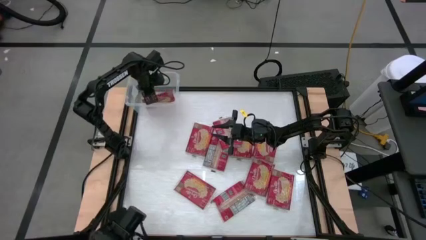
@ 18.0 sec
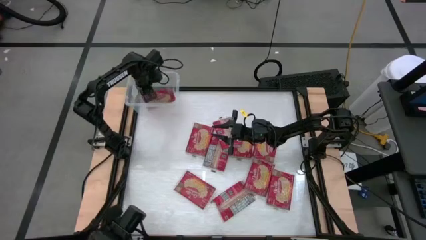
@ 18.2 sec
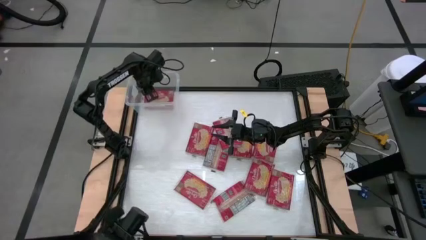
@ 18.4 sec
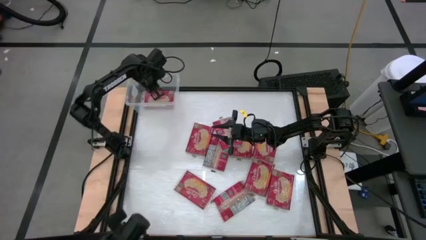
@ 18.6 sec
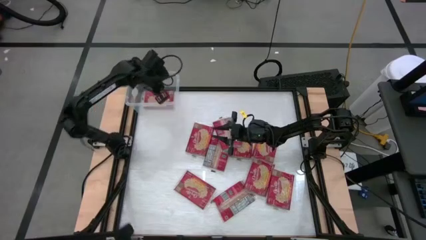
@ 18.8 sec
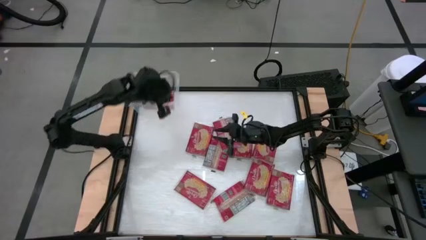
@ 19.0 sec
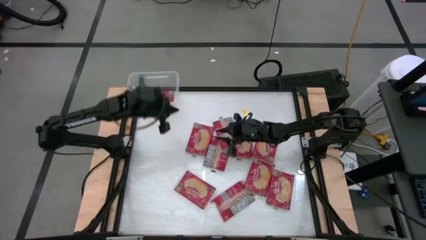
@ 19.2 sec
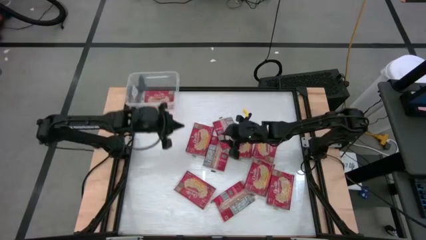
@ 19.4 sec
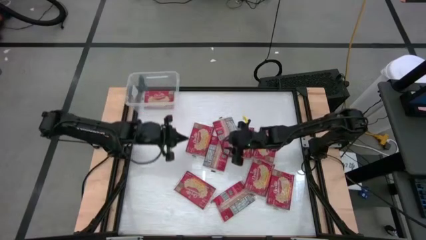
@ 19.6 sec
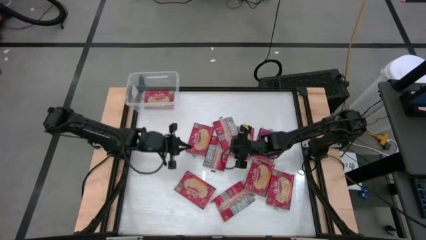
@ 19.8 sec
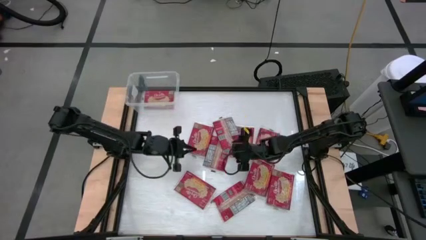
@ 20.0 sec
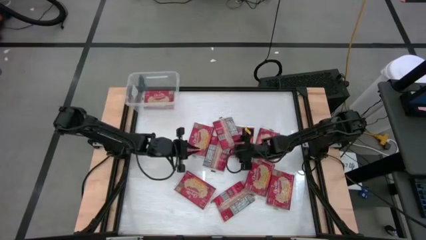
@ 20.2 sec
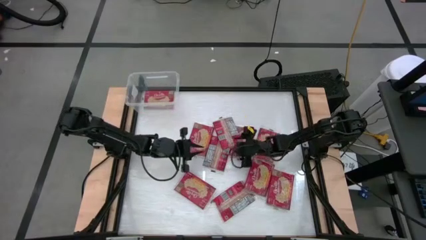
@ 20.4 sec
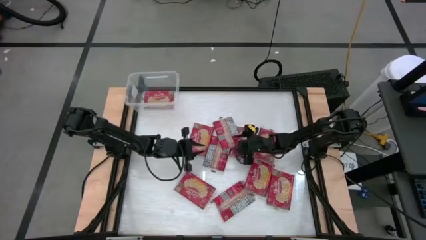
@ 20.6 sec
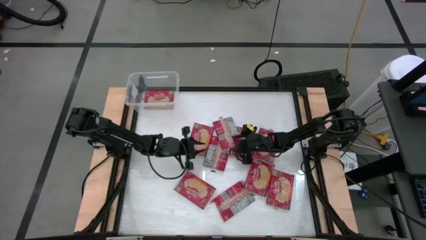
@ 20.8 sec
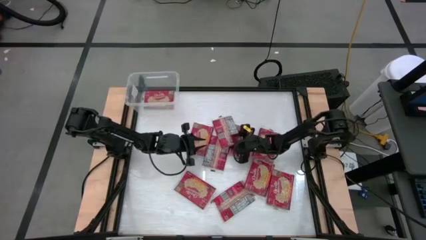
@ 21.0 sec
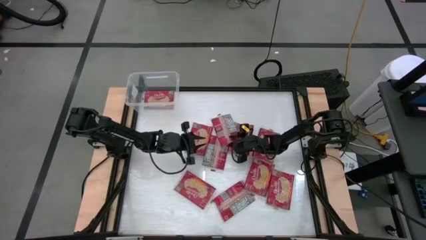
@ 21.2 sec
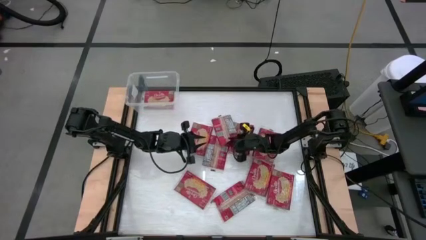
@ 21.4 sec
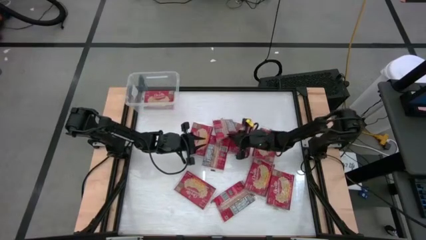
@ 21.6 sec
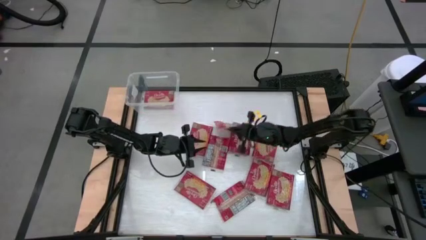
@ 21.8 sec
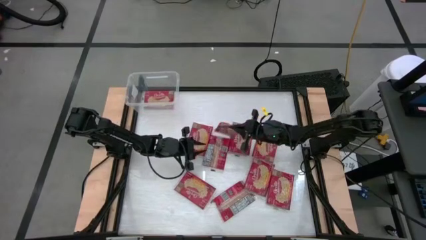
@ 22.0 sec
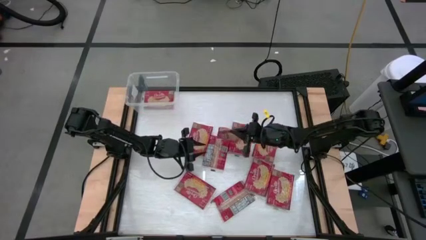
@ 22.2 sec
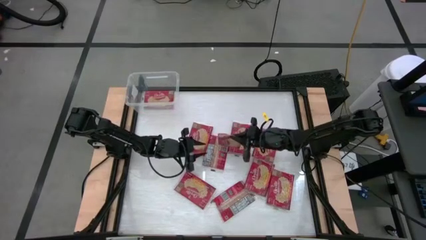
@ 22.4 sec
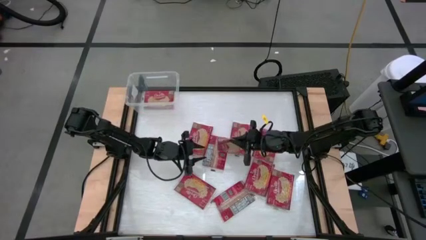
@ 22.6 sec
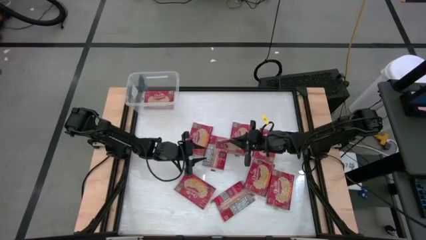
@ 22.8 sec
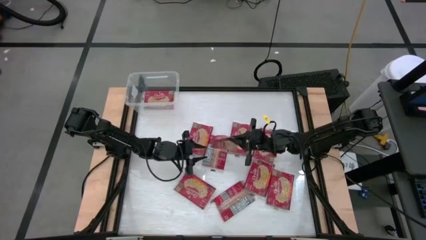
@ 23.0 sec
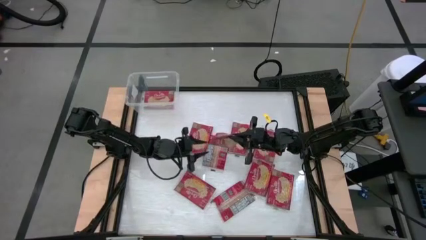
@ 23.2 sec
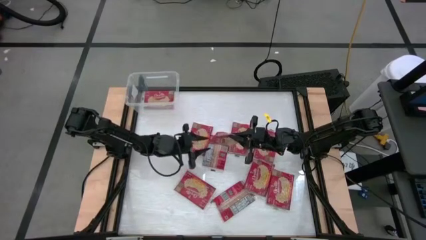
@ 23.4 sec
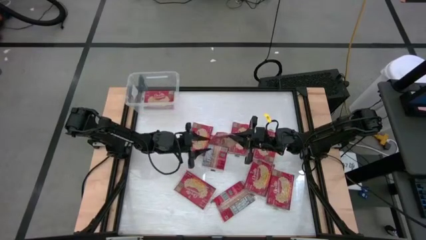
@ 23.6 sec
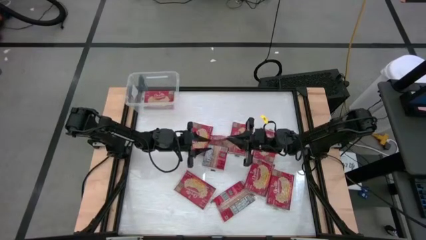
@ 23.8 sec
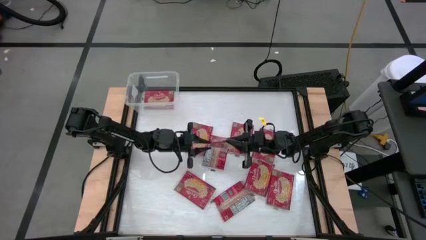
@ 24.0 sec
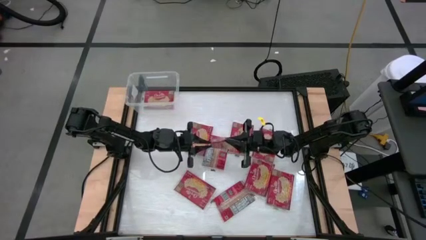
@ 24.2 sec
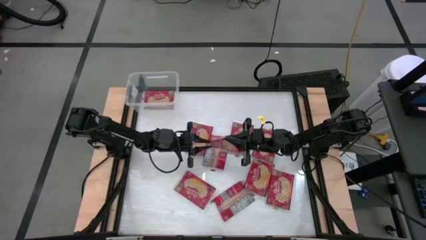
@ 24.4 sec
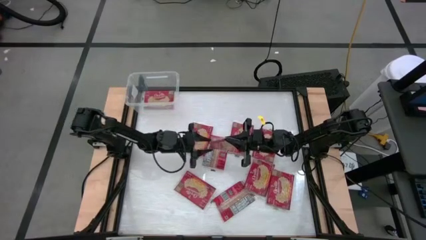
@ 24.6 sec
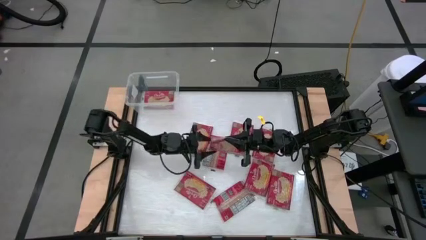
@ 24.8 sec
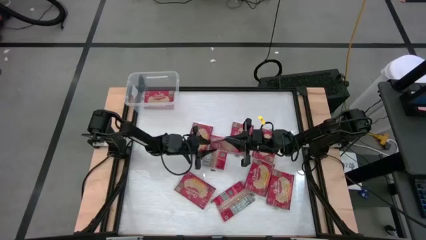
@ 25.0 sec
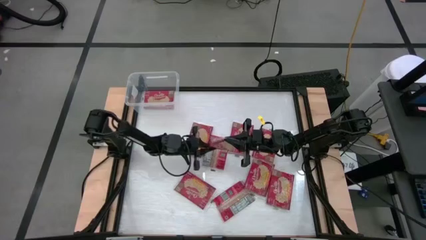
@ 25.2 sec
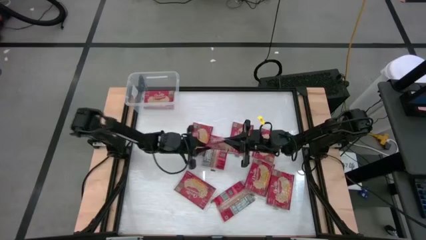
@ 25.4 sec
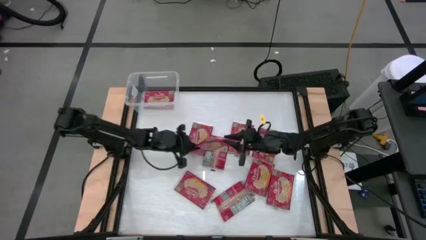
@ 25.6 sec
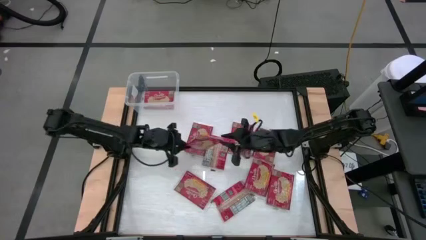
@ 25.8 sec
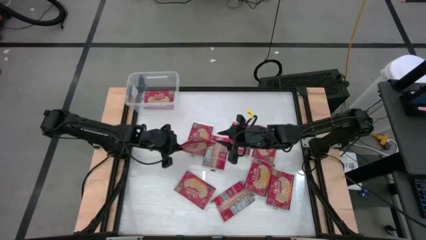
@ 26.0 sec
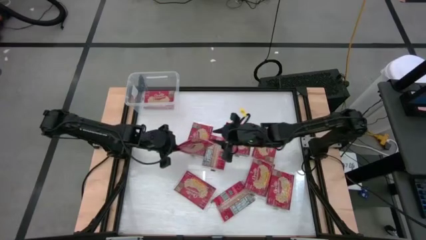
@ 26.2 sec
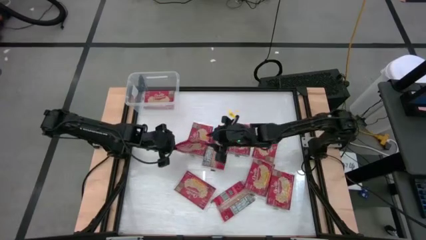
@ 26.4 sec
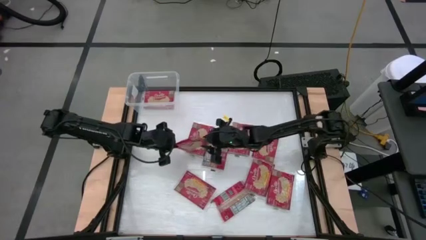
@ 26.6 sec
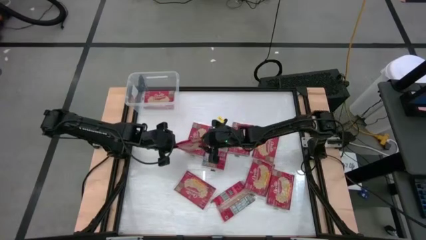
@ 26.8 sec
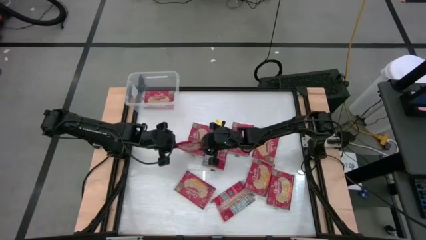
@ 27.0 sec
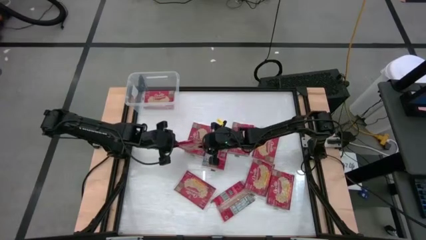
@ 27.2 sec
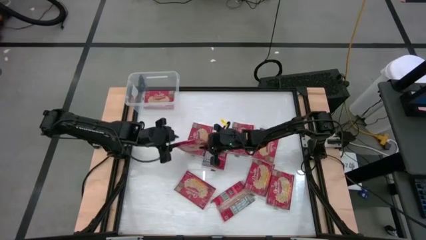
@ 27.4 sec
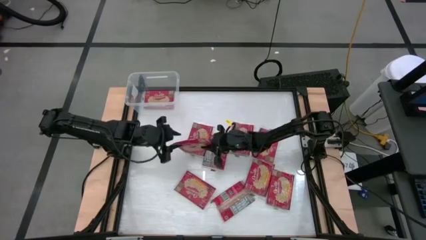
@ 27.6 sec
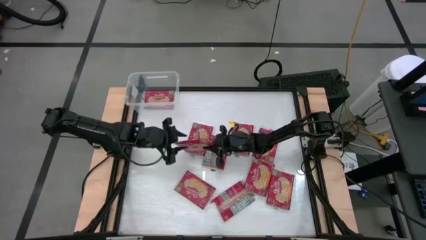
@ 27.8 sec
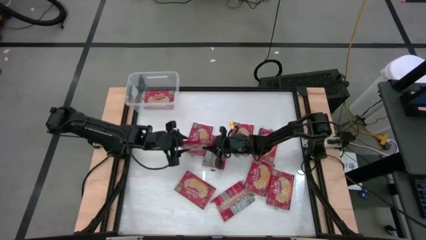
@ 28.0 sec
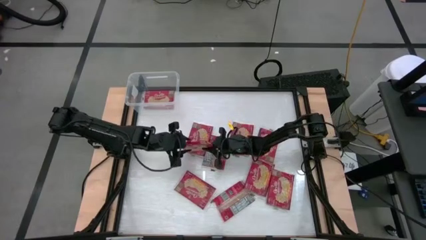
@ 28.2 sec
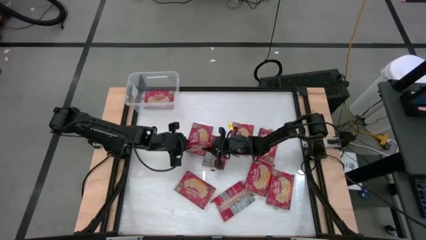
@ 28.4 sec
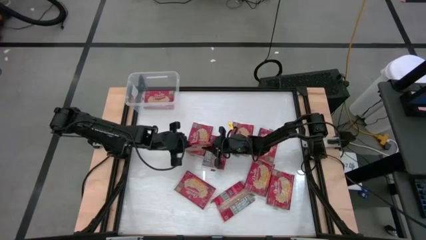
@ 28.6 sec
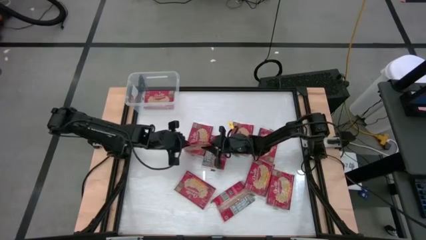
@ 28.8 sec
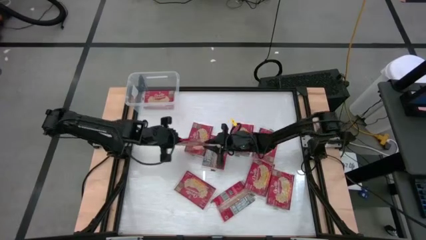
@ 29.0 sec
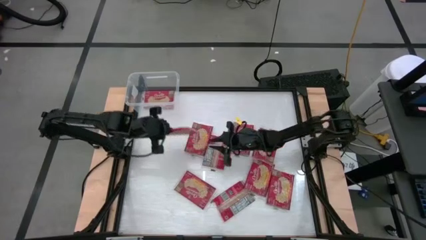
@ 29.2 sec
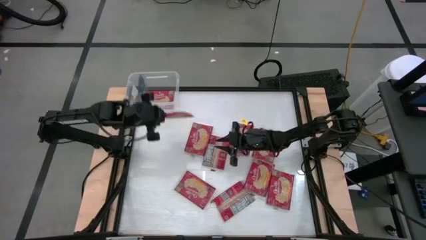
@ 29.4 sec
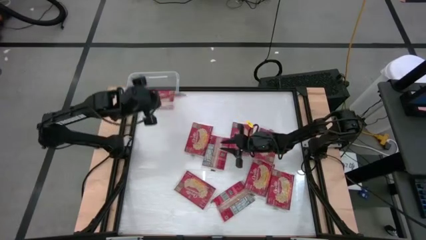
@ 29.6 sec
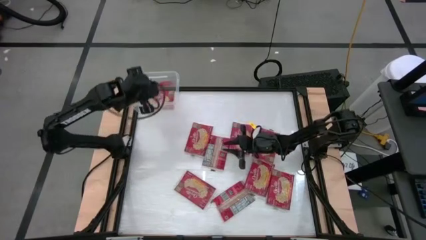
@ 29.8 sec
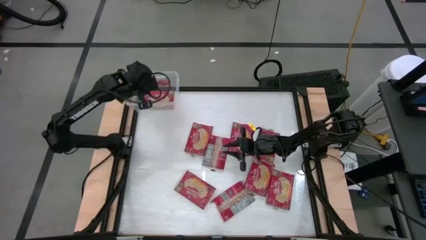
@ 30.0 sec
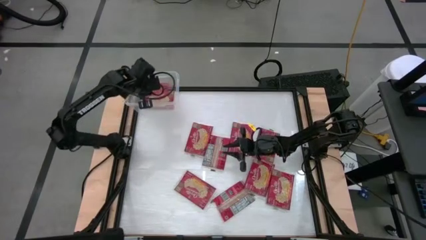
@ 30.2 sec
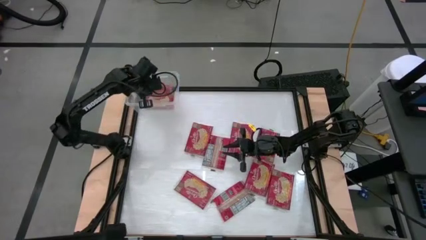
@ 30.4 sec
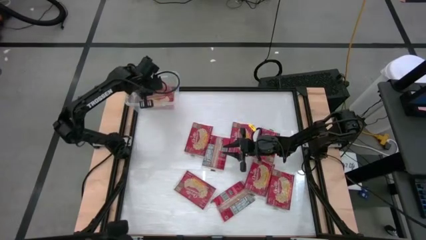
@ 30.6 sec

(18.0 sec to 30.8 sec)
Task: Sort popcorn bags into baskets
Put the red popcorn bag into the transparent container

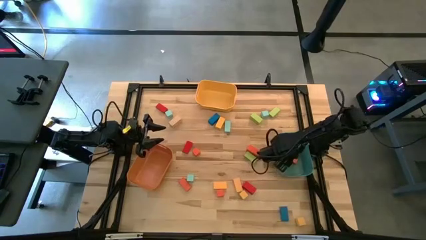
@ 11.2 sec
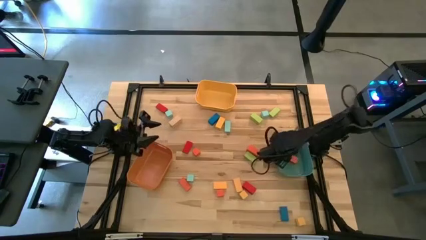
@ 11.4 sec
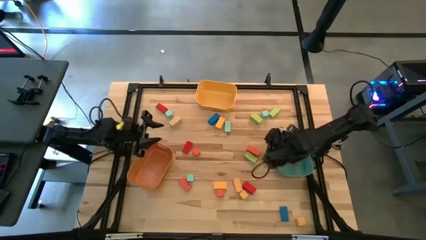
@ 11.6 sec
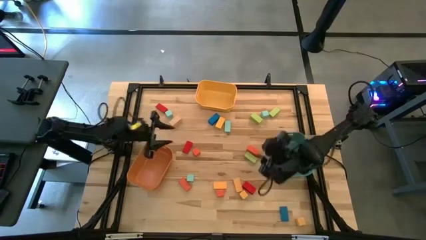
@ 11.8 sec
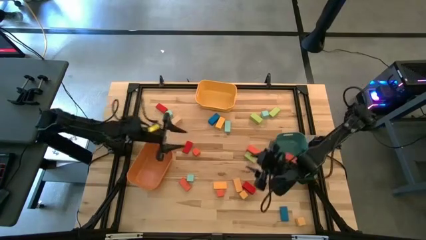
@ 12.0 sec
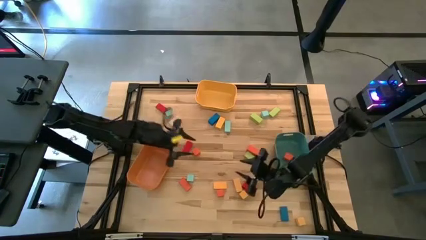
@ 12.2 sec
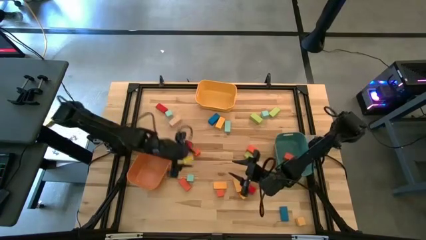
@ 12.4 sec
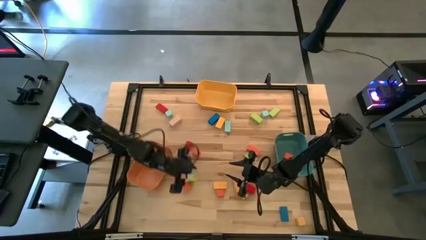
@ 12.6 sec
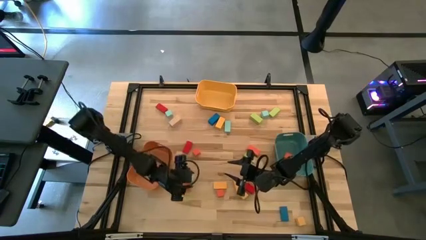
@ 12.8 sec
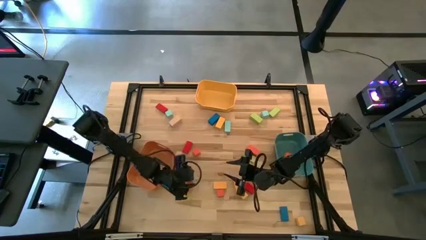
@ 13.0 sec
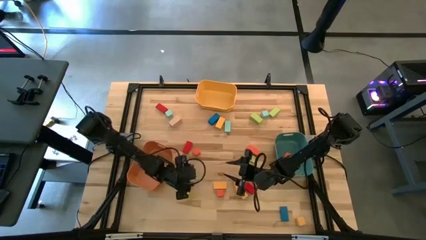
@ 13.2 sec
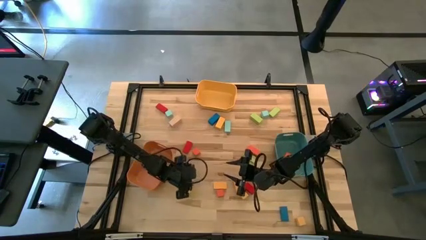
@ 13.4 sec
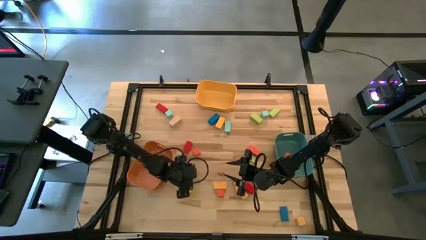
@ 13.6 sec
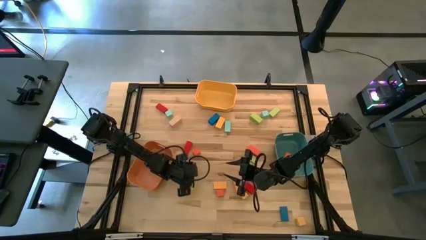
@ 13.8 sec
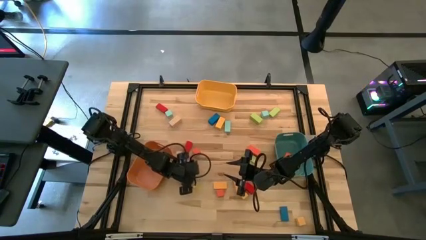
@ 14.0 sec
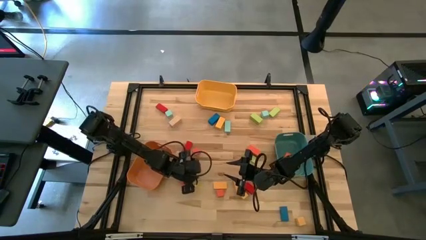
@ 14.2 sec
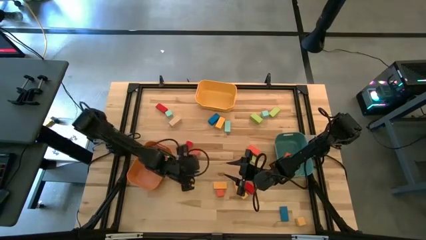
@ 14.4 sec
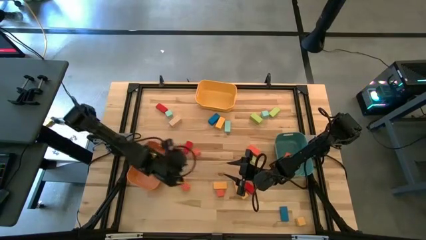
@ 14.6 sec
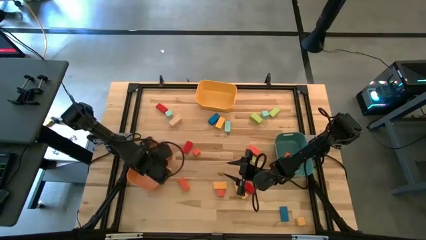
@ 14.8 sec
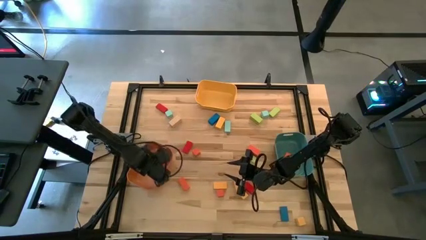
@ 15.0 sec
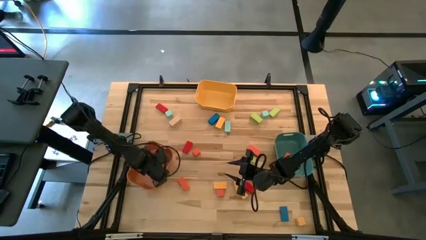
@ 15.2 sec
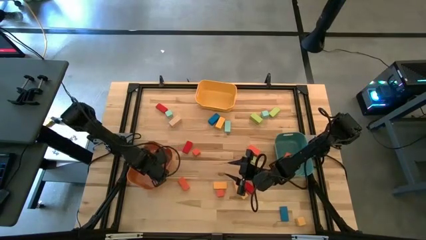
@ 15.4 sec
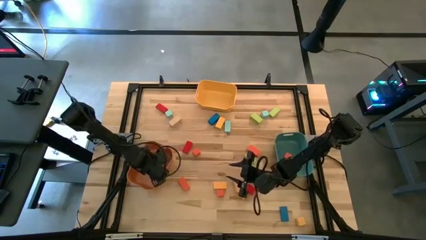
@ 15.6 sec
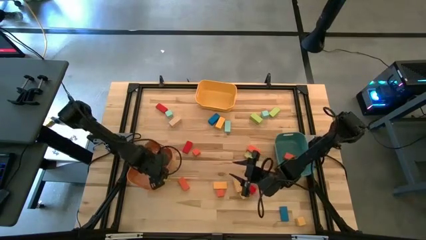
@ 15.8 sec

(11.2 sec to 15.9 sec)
Task: Sort blocks by size
Put the light blue square block into the orange bin
